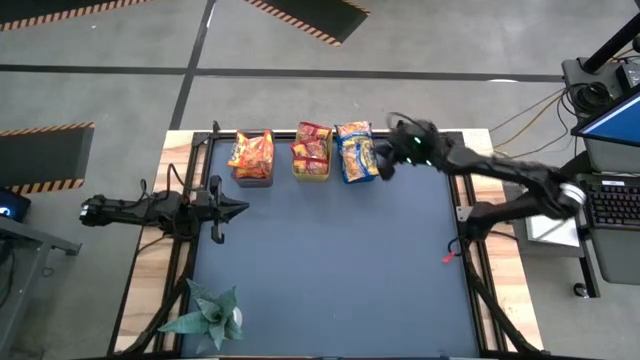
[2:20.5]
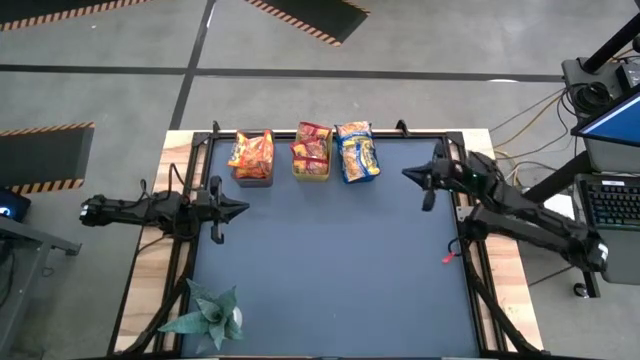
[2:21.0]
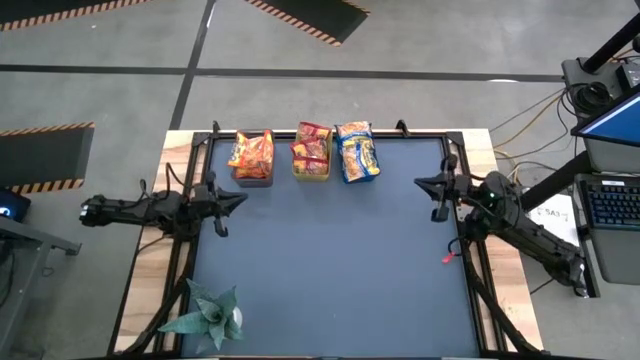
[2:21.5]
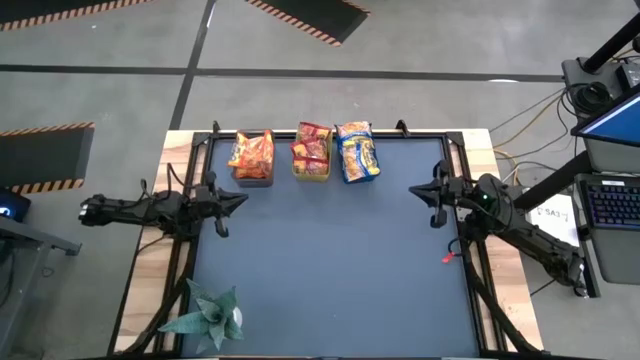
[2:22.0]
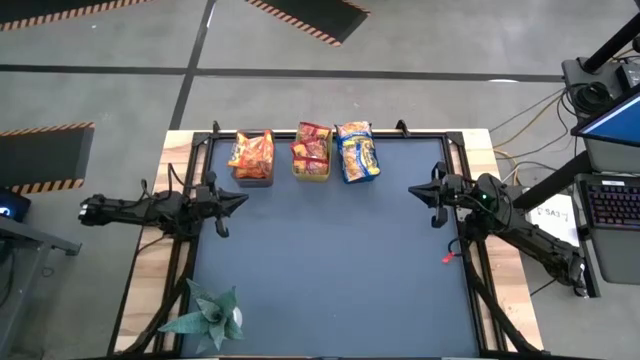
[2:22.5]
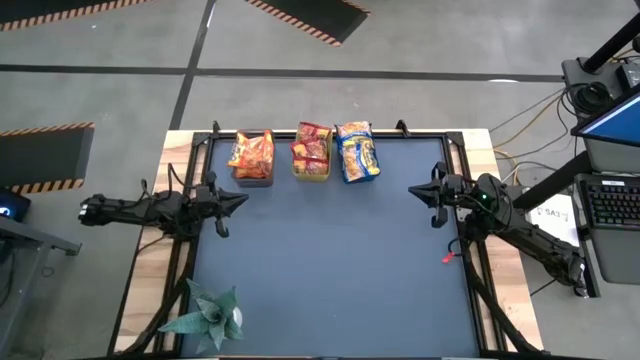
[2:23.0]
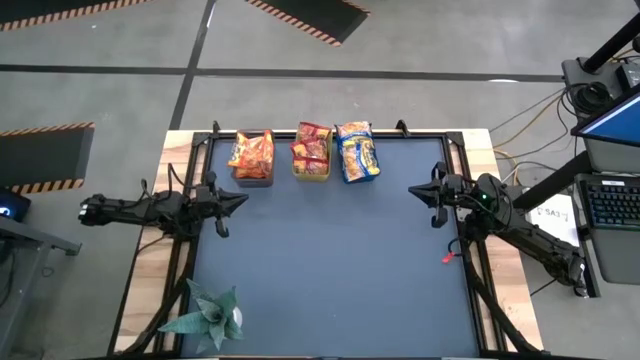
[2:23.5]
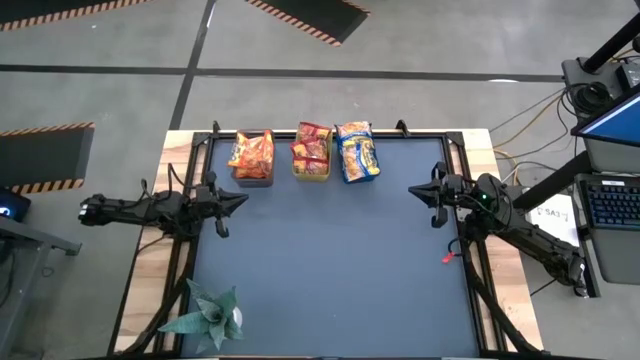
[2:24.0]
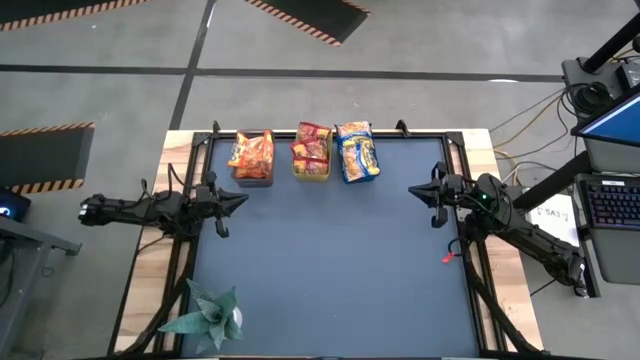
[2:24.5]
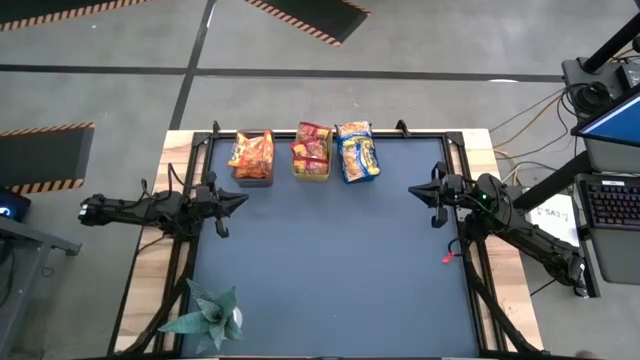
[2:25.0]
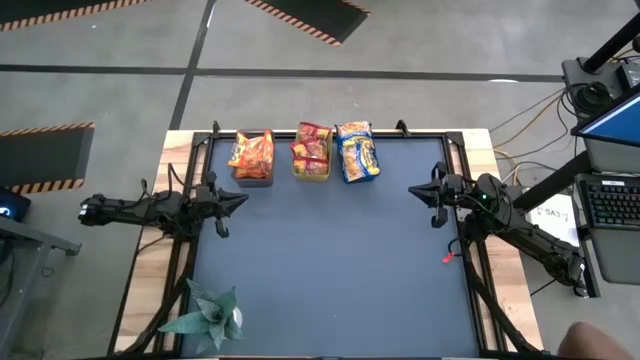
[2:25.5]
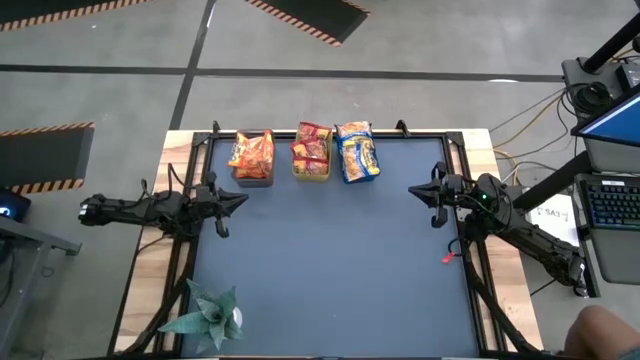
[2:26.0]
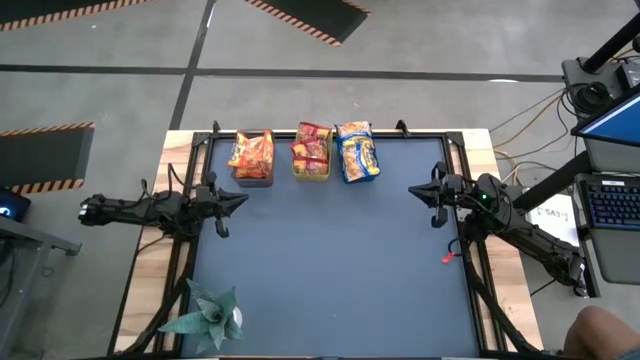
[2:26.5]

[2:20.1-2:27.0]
Task: Sort Maruchan noodles
Return to Home Position

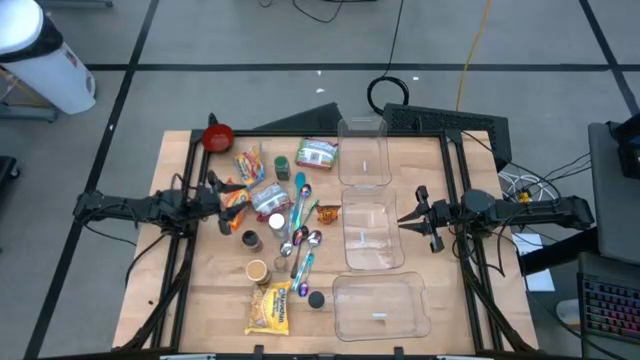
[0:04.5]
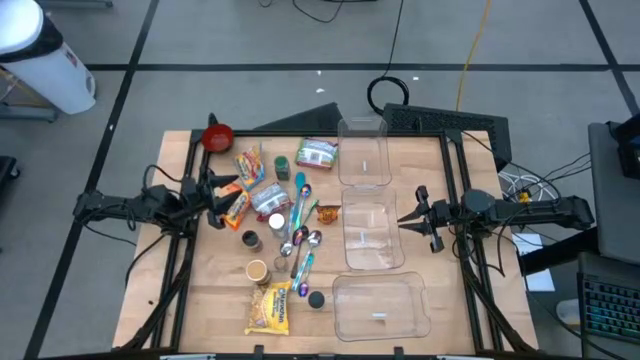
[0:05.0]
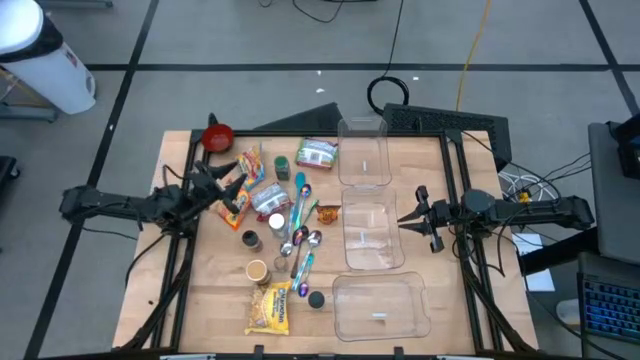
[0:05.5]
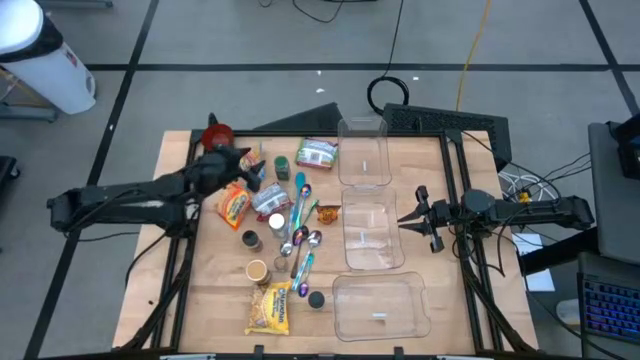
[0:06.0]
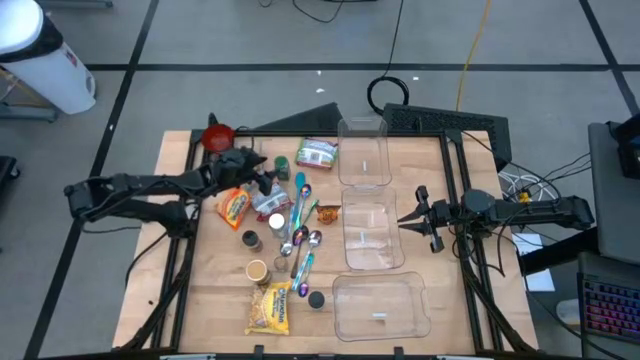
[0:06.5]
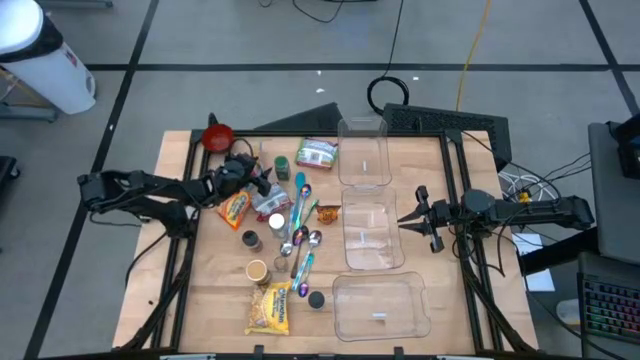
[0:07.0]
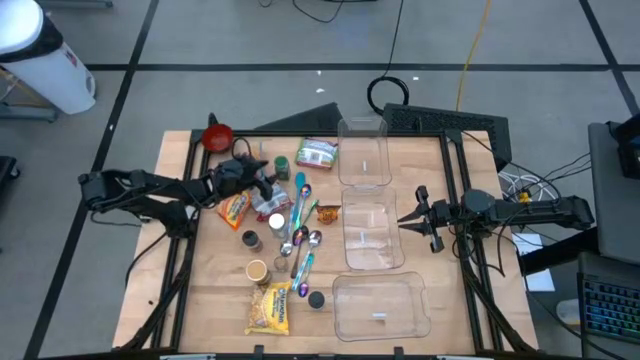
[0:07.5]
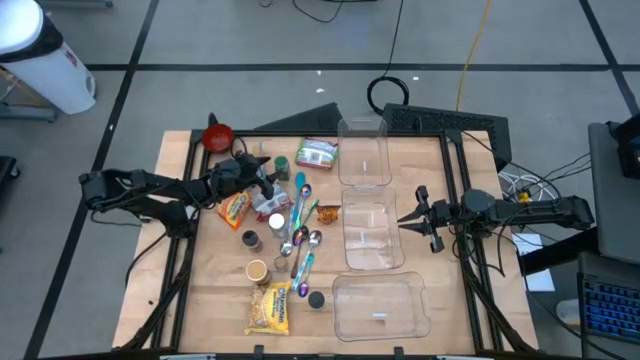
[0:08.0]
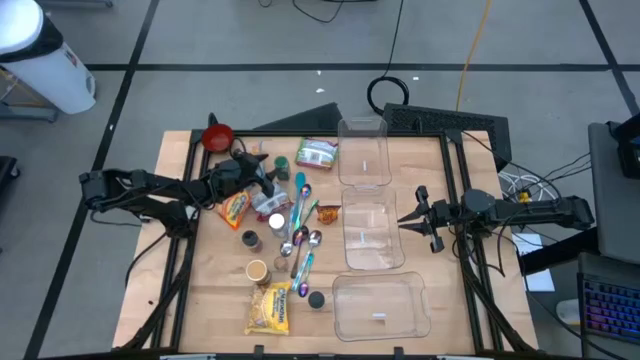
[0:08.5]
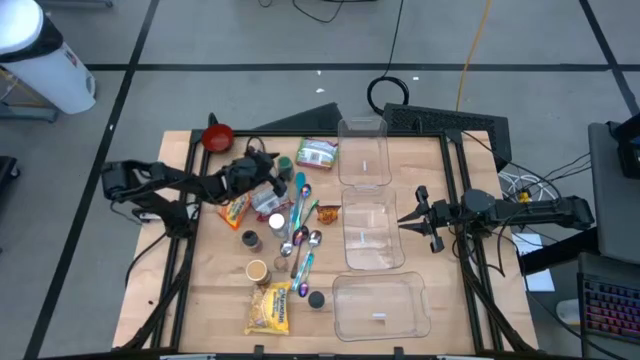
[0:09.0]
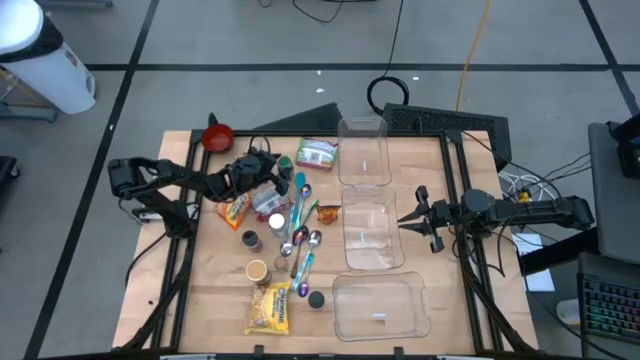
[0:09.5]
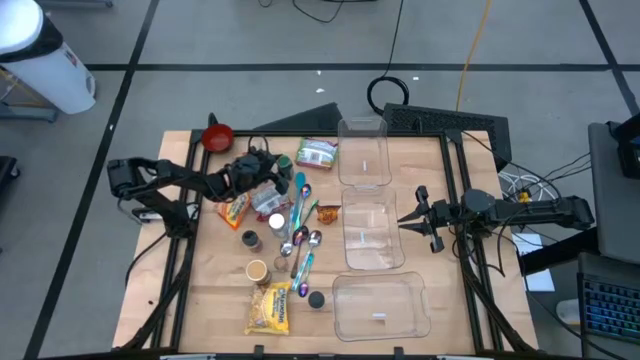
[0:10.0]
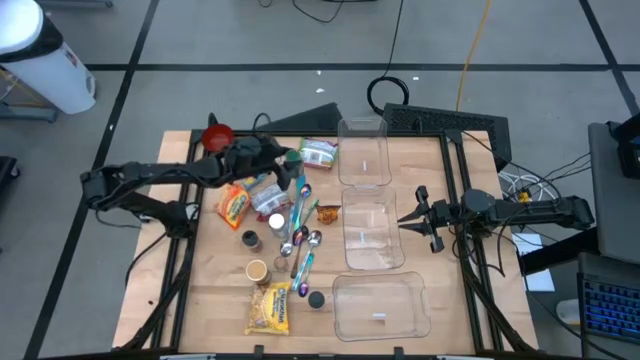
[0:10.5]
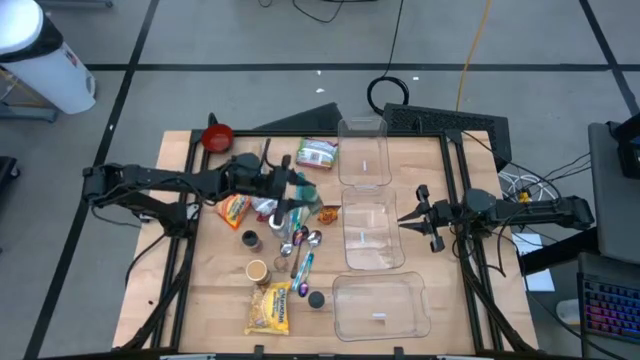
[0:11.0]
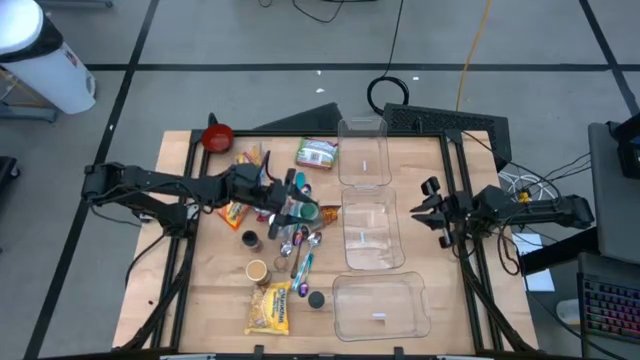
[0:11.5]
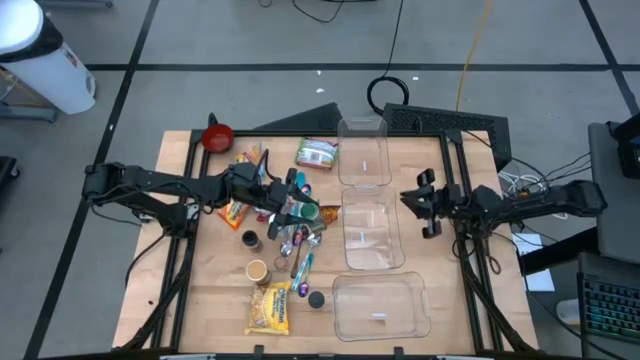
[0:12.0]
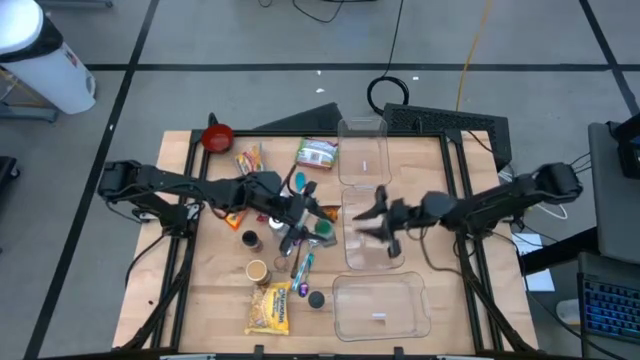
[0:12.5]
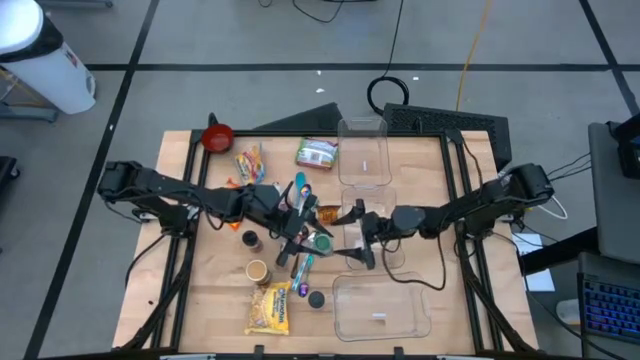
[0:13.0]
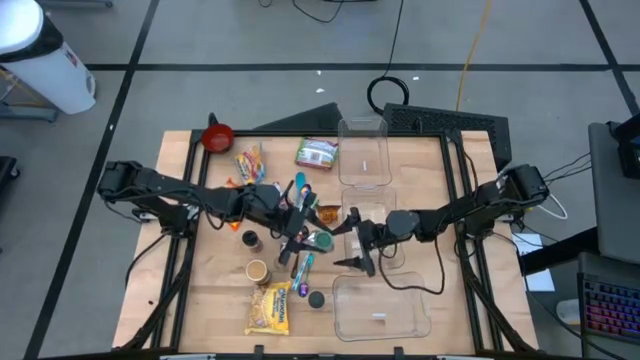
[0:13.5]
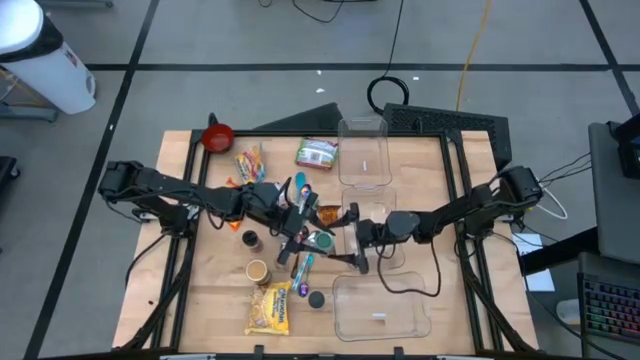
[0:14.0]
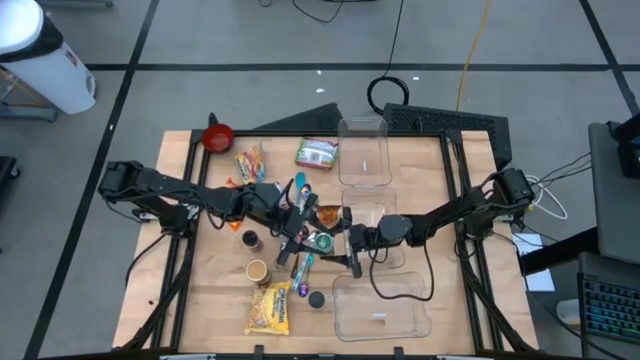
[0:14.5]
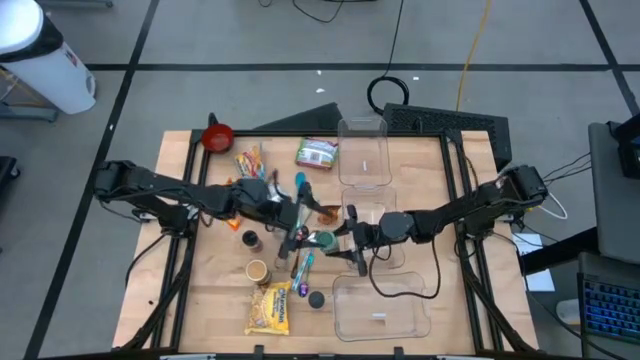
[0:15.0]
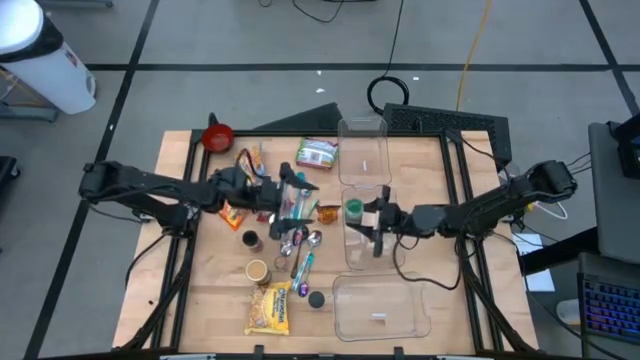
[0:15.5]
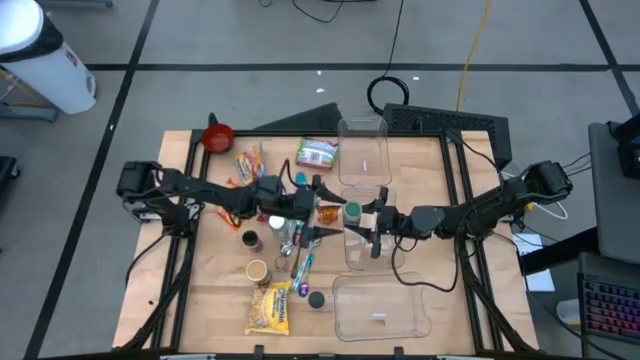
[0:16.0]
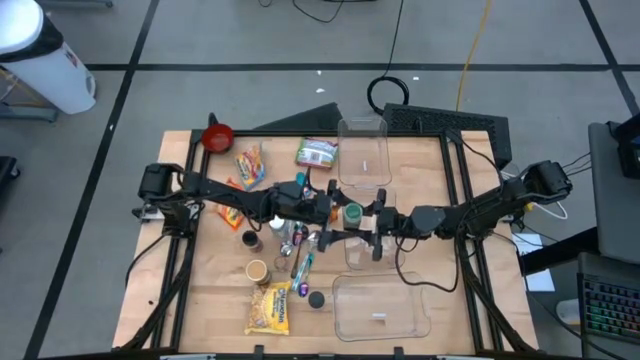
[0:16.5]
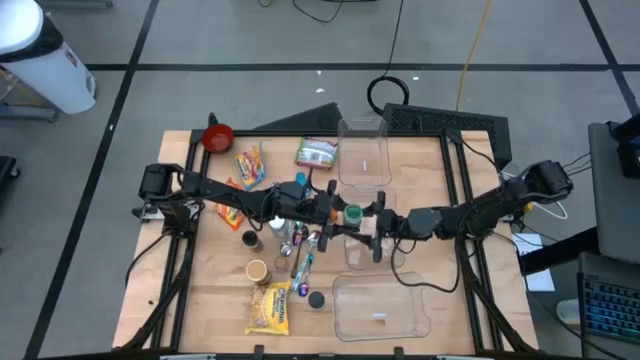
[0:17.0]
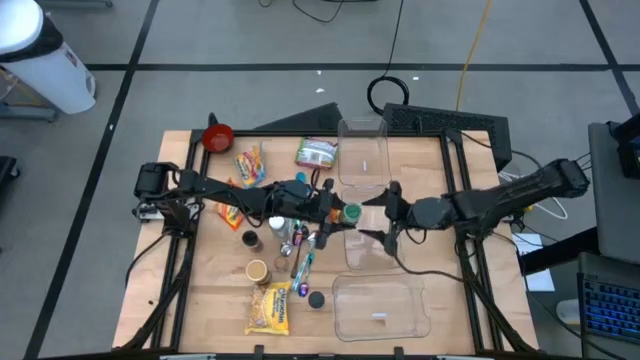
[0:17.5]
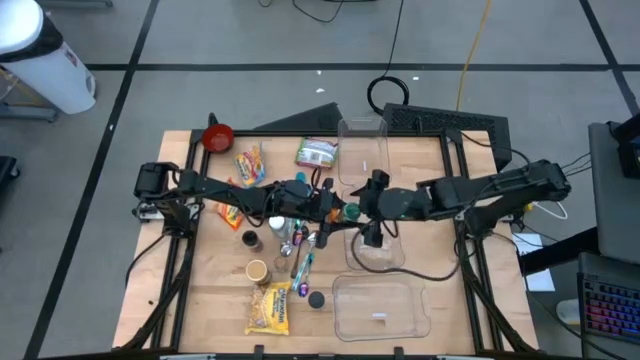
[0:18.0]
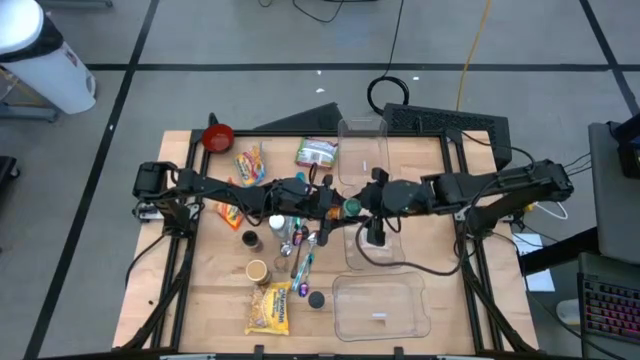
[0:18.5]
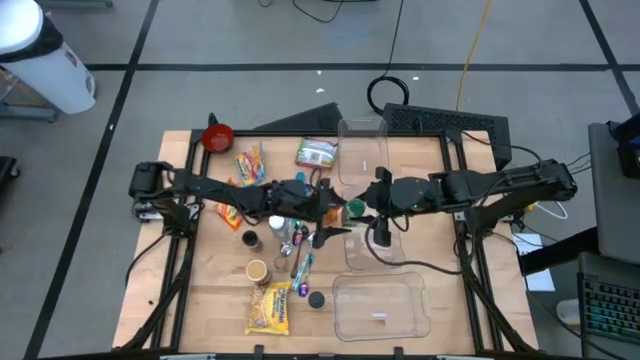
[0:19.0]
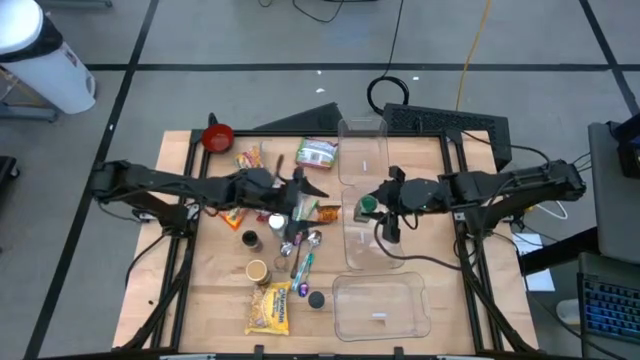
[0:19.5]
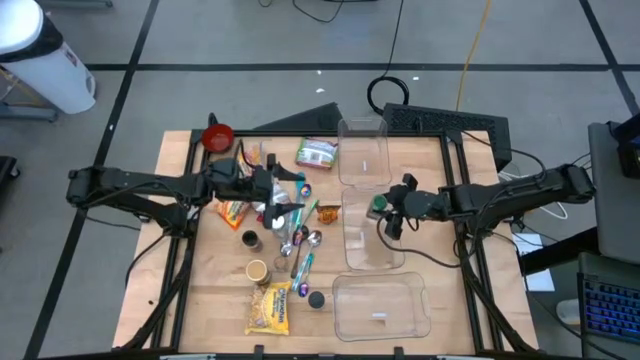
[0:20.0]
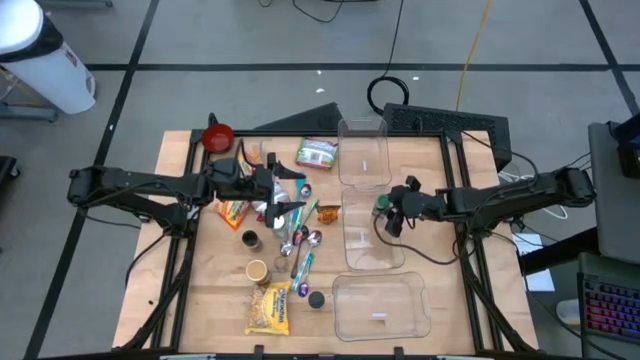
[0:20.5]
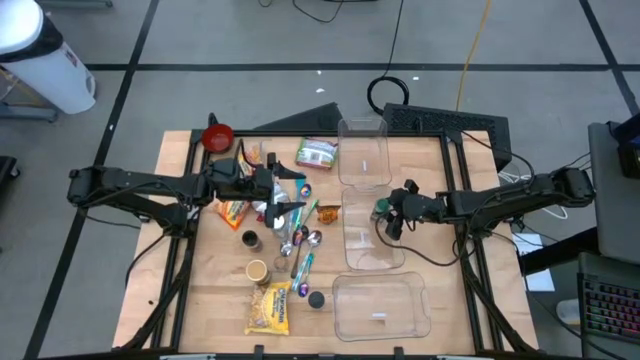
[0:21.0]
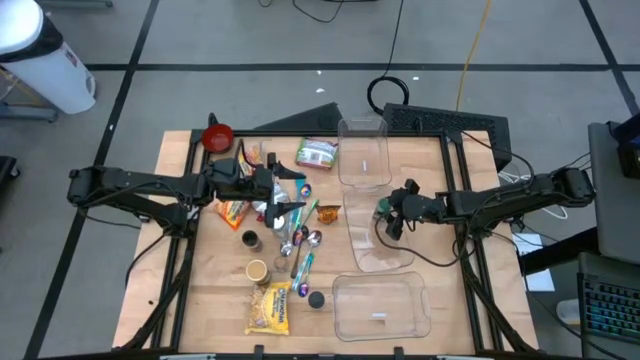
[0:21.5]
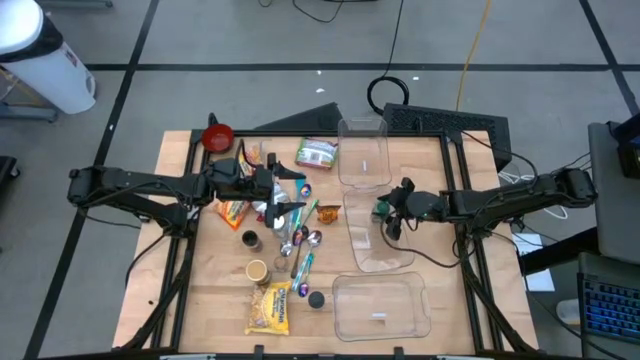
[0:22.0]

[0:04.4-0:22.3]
Task: Pick & Place Food Item
Put the green seasoning bottle into the middle transparent bin
